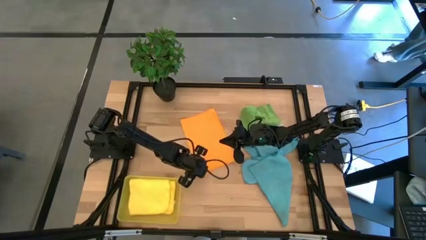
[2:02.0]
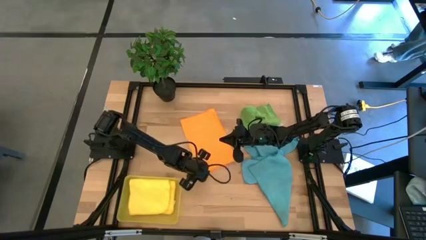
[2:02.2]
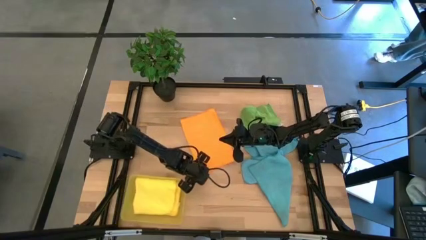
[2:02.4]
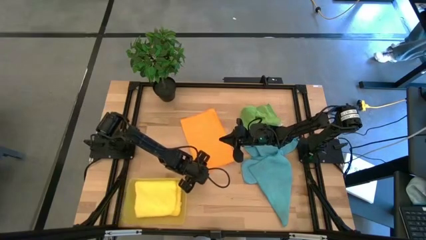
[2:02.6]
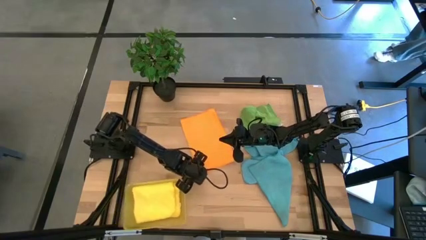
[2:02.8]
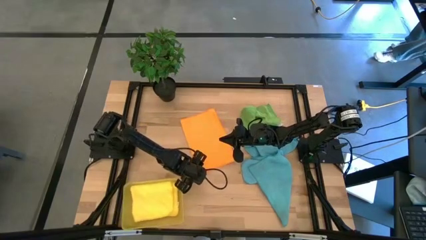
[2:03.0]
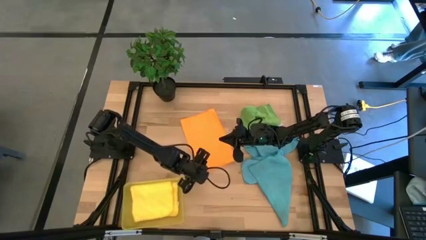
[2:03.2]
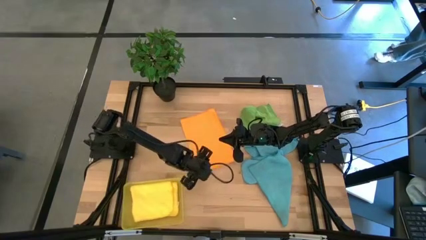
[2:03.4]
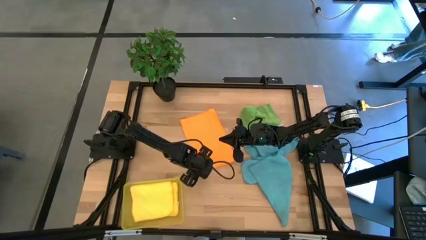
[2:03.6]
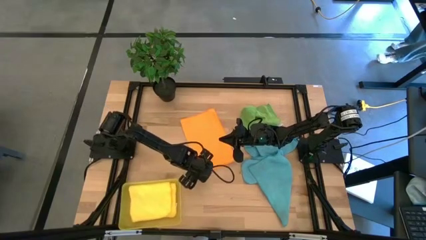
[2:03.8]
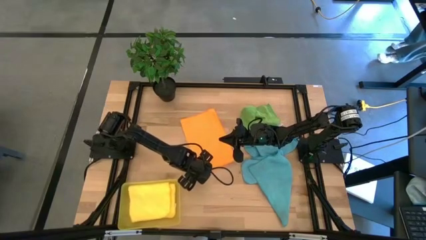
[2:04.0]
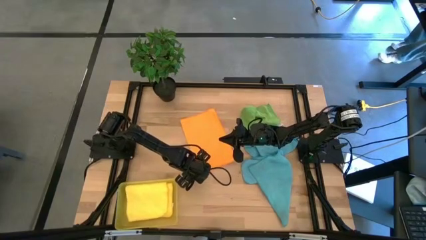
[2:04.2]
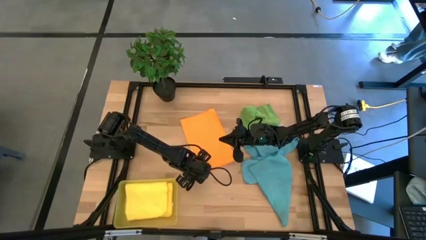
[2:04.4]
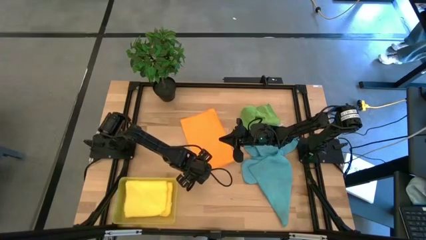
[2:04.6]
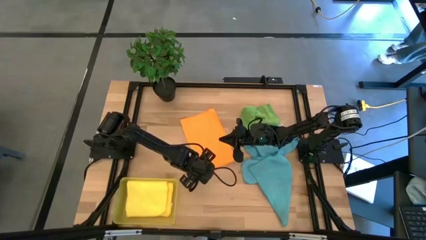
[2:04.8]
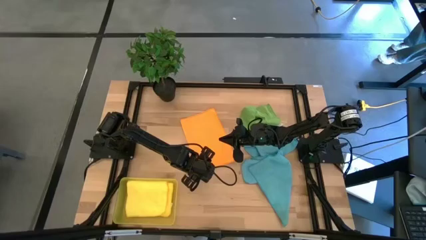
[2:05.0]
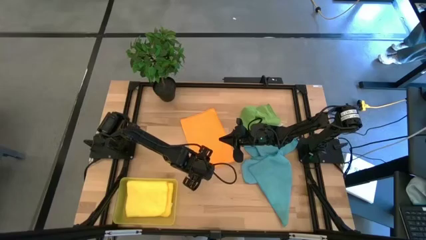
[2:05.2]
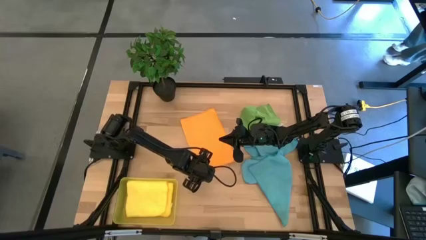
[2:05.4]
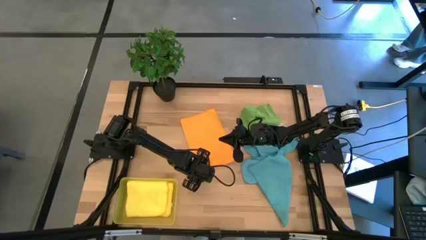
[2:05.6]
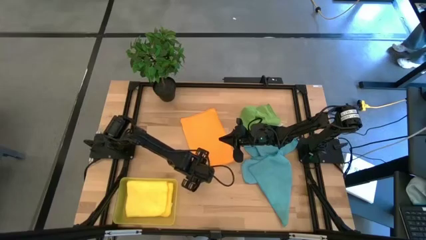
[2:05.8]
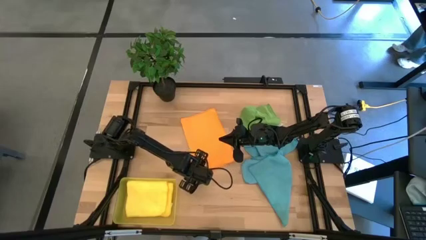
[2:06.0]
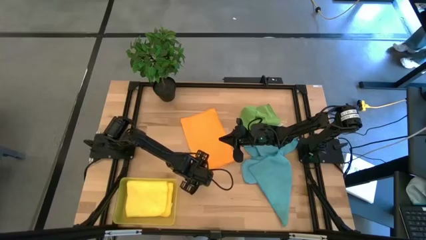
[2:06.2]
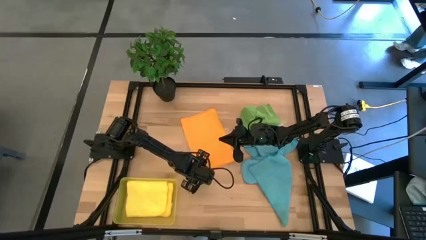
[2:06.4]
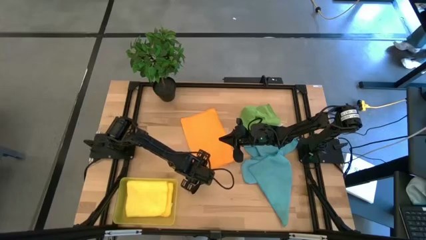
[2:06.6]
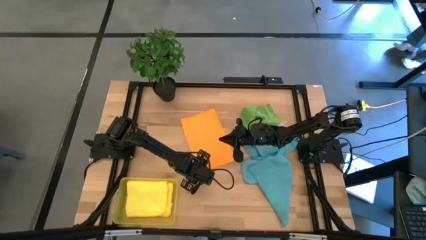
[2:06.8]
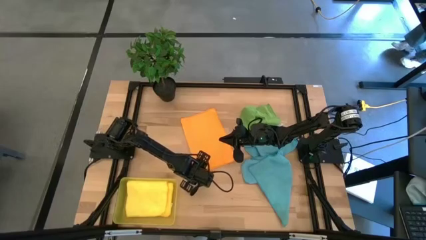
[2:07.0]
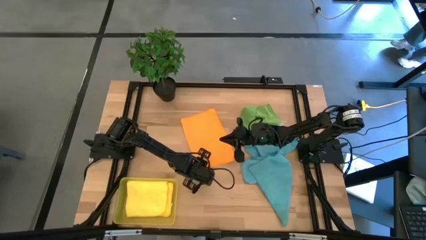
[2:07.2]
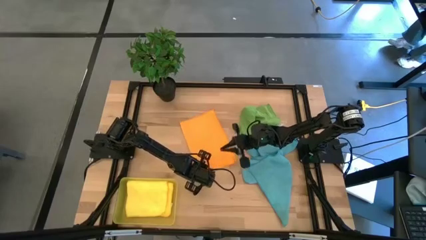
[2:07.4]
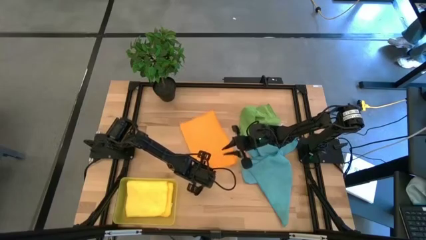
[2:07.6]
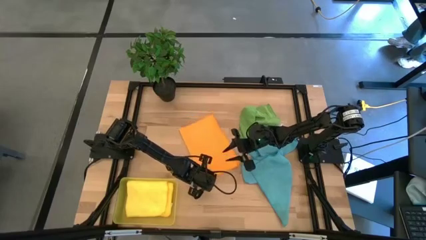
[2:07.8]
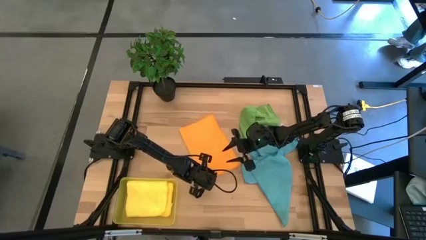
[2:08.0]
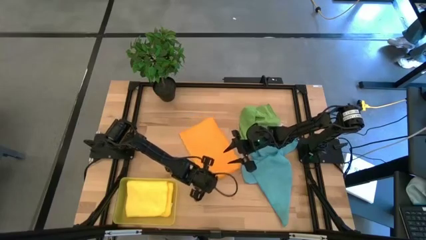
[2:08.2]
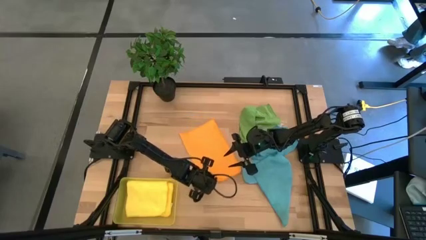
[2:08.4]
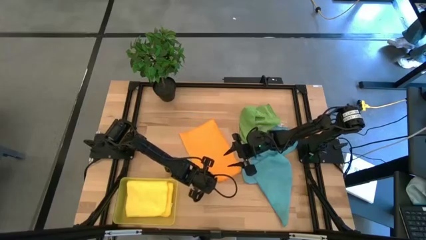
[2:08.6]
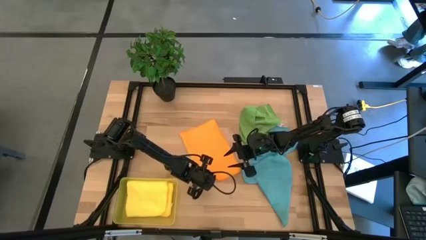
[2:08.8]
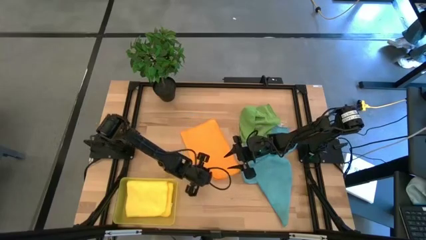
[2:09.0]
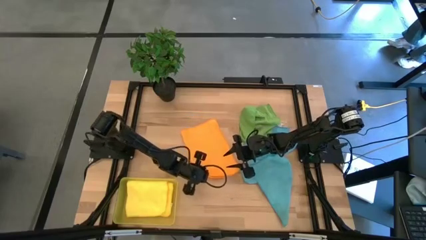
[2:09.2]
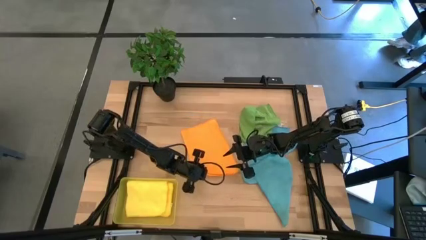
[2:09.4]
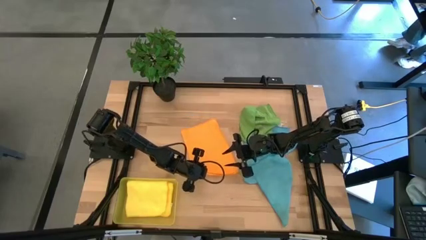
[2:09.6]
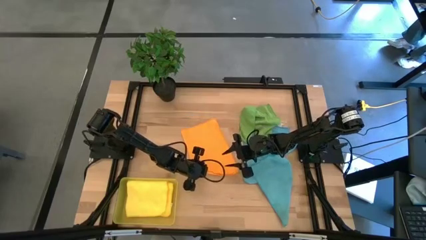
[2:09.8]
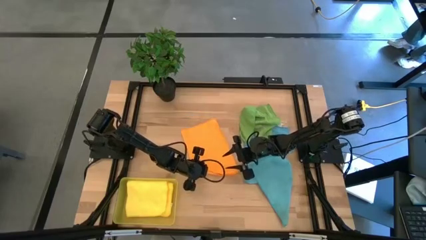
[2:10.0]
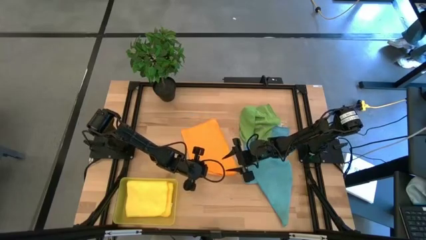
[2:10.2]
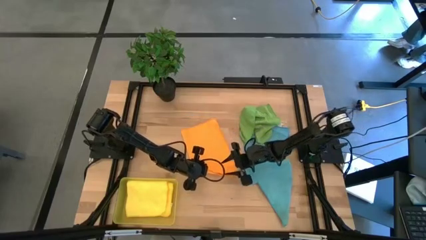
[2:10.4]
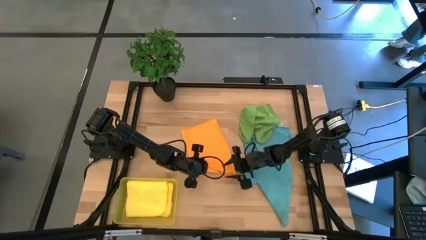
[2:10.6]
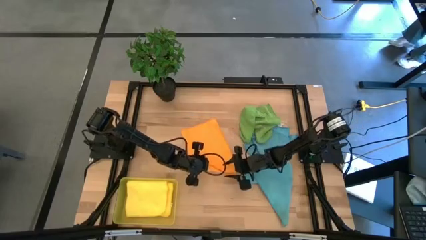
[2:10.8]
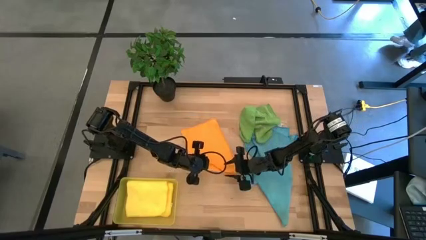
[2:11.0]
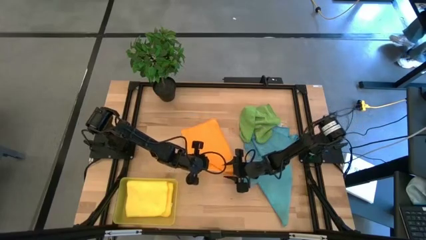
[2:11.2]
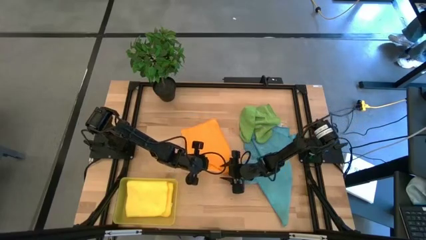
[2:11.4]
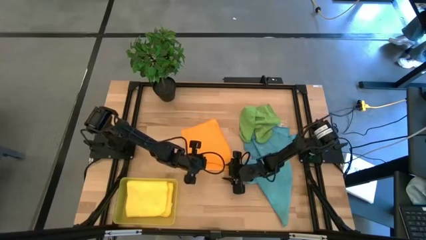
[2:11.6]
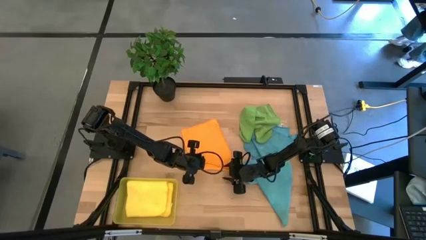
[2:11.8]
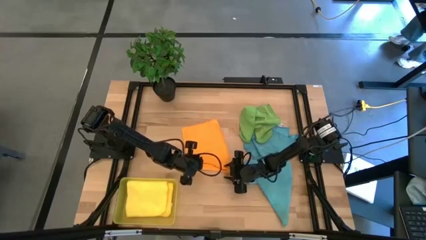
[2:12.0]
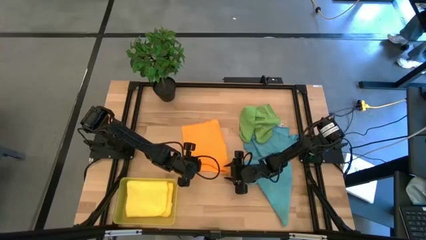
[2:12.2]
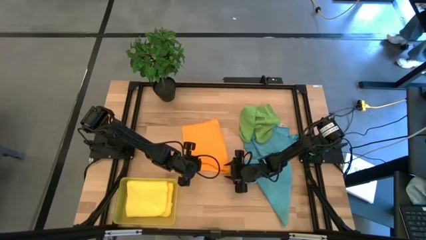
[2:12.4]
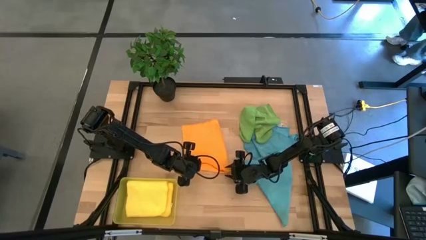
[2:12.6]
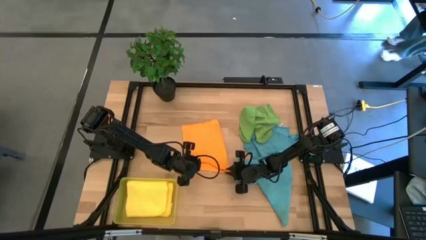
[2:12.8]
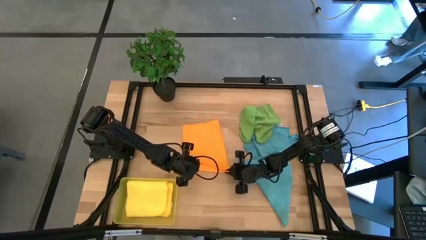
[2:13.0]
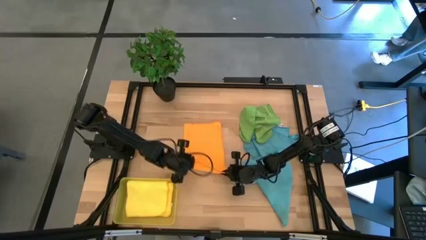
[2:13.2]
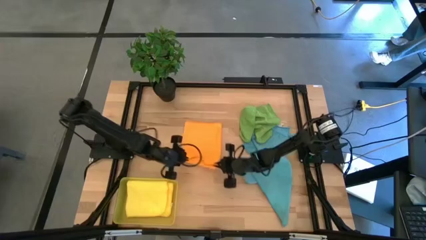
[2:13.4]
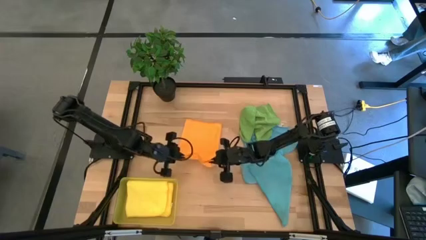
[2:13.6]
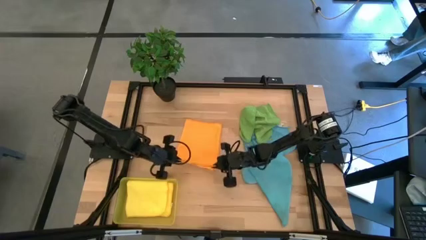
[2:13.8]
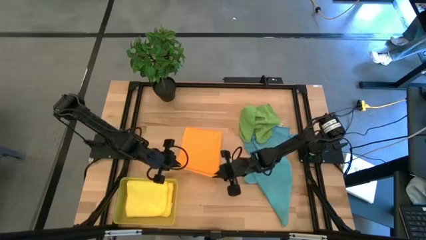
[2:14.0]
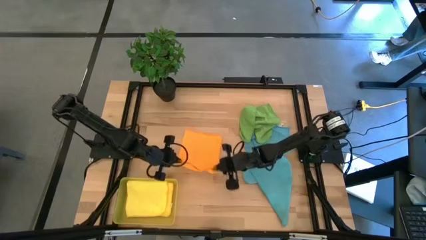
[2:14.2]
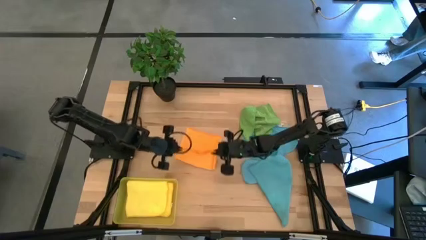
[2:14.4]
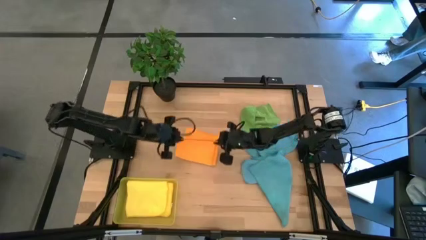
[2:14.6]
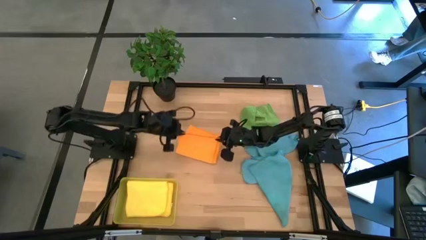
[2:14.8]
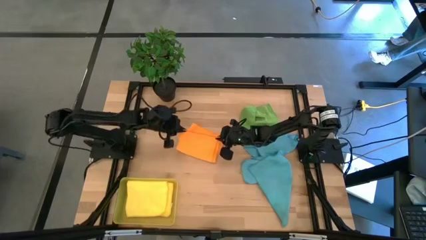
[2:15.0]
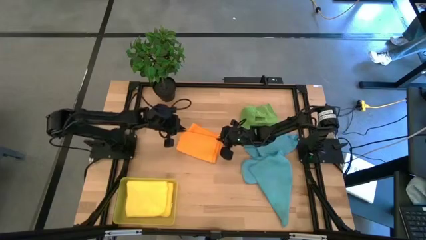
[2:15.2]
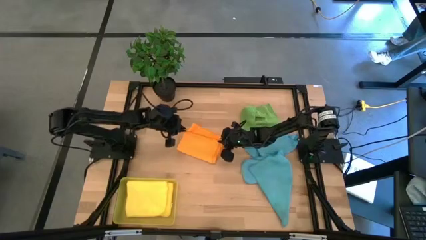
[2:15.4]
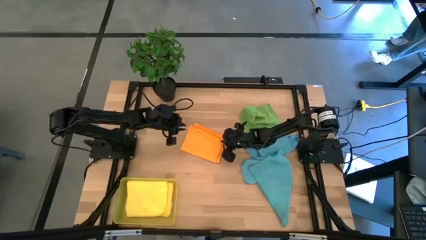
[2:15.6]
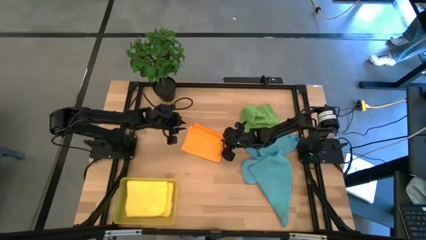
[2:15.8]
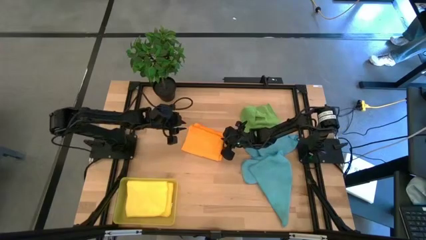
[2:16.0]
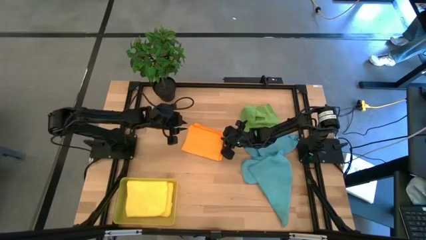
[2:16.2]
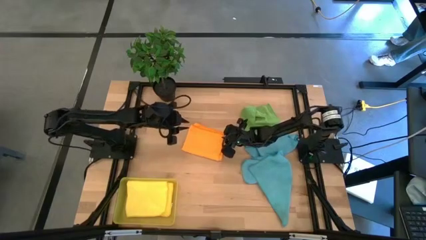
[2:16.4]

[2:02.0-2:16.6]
Task: Fold microfiber towels
Fold the orange microfiber cloth
